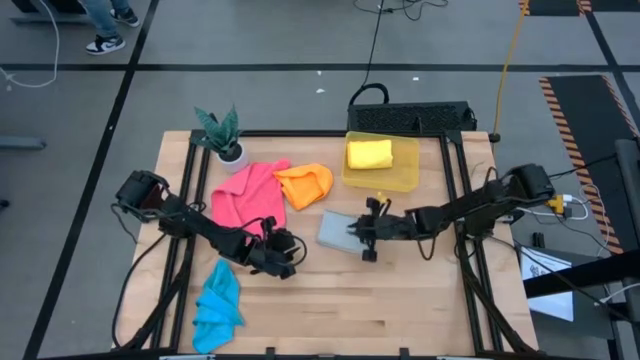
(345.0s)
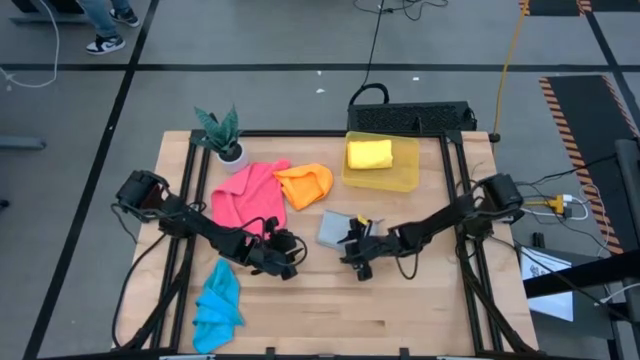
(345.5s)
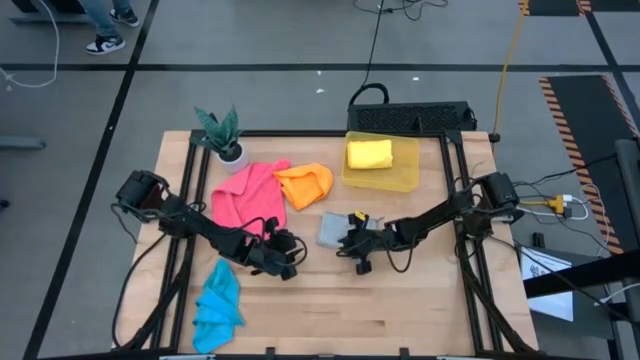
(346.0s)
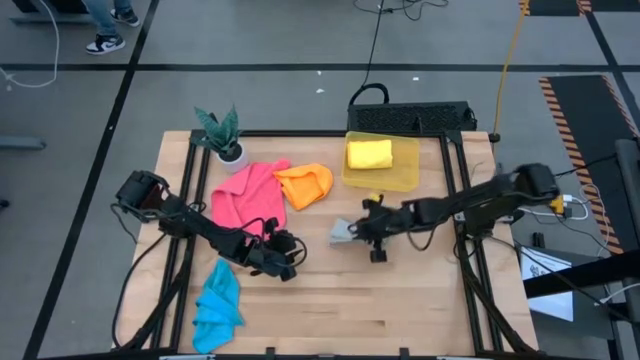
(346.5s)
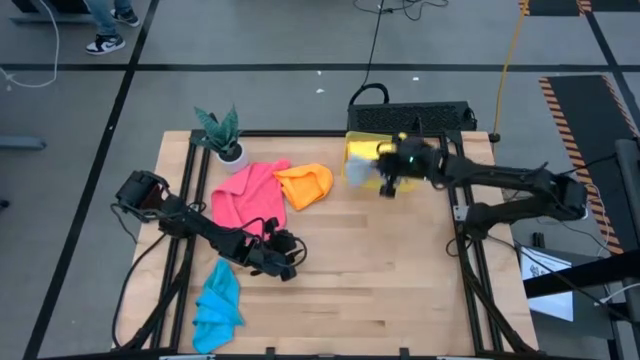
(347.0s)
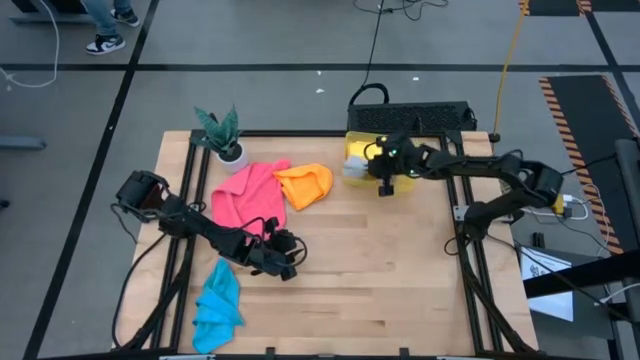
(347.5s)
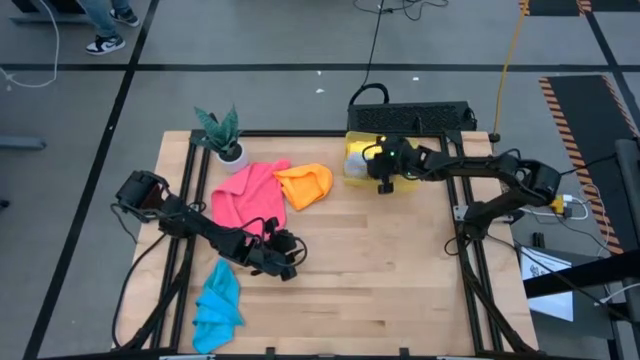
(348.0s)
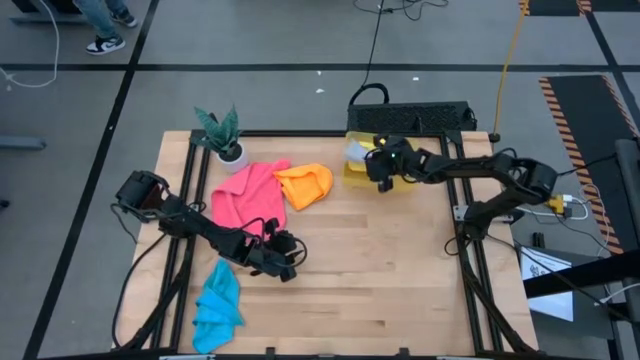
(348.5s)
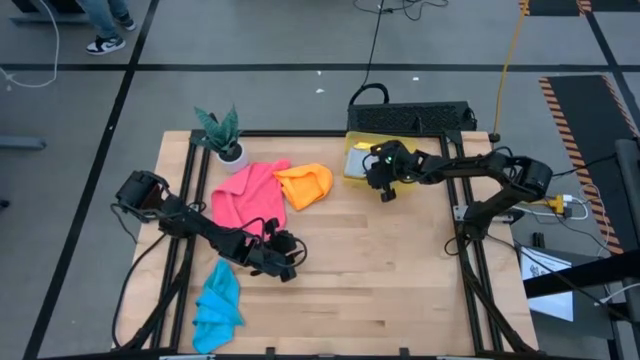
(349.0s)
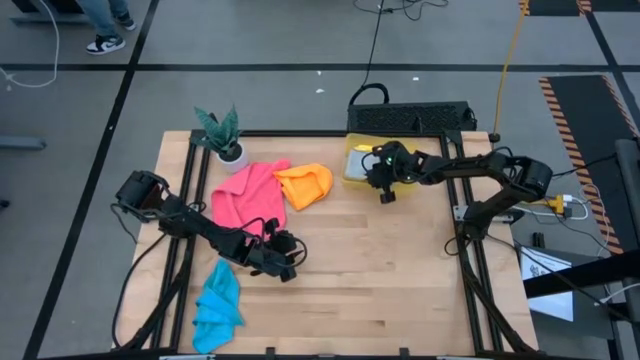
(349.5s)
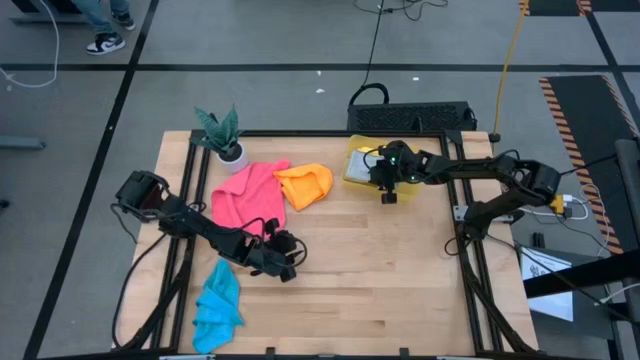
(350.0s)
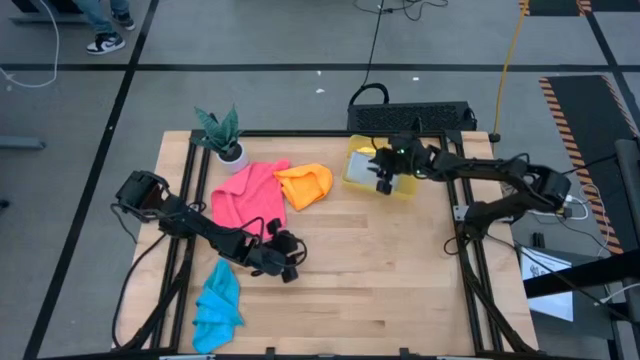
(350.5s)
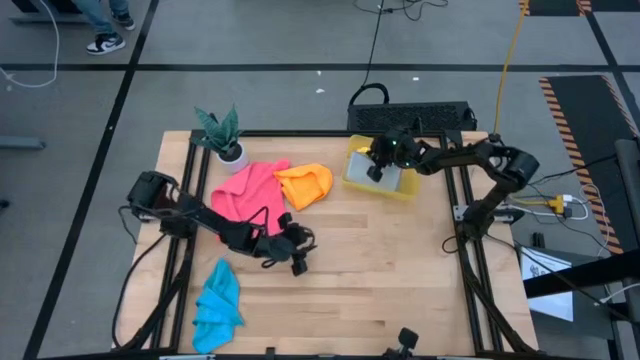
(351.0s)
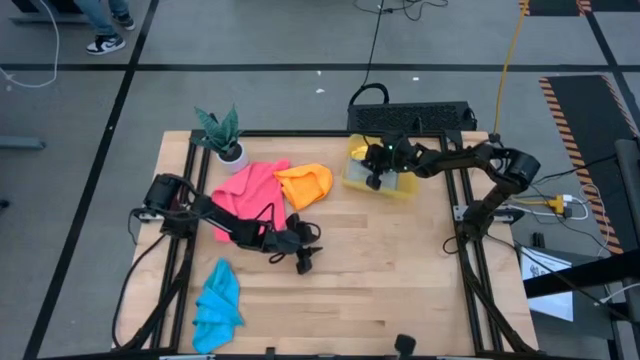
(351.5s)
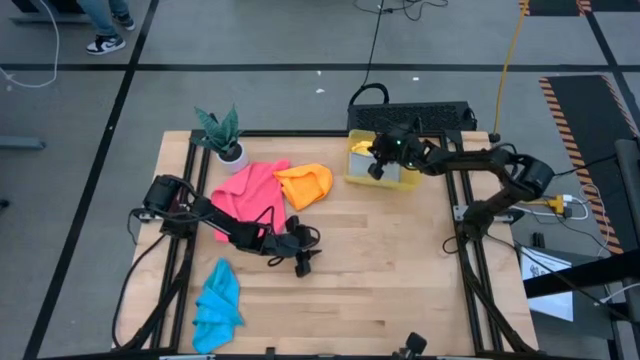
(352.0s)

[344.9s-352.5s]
Task: Fold microfiber towels
Put the gray kitchen towel into the yellow bin

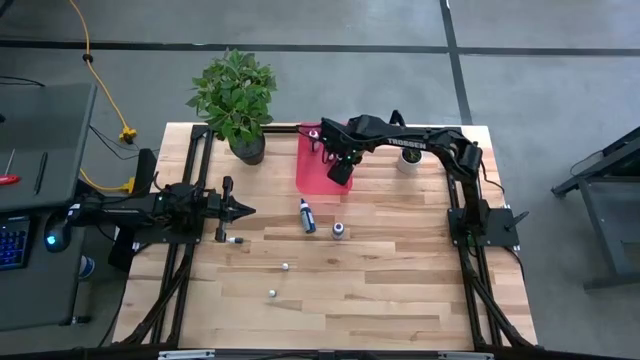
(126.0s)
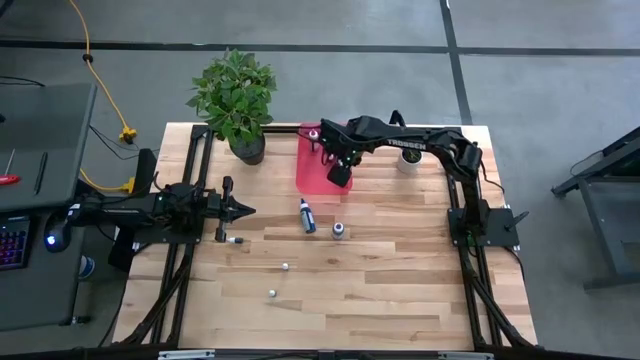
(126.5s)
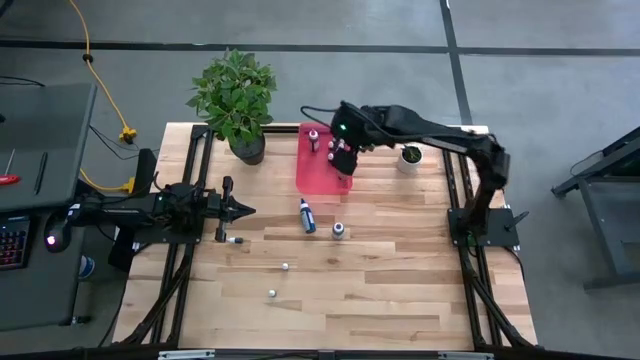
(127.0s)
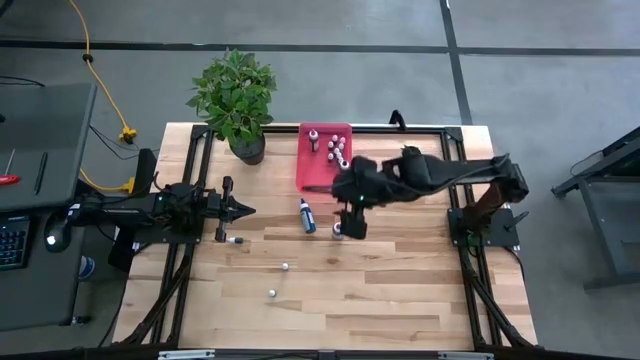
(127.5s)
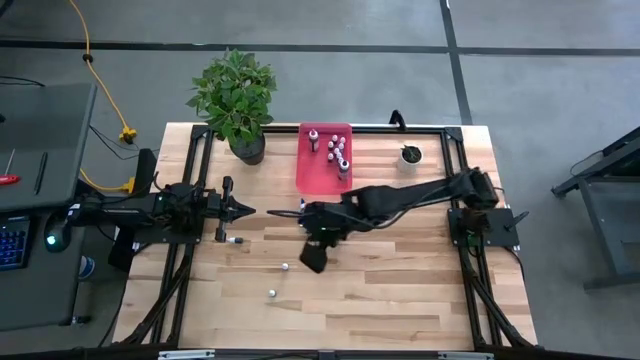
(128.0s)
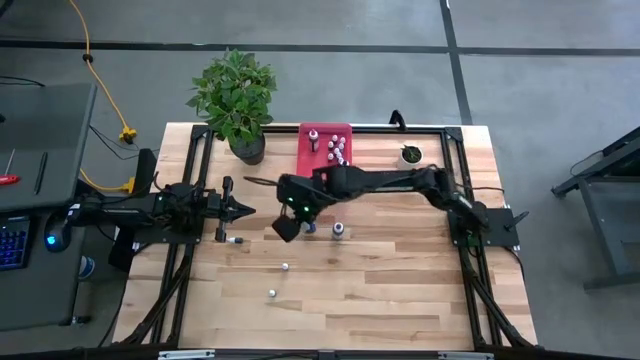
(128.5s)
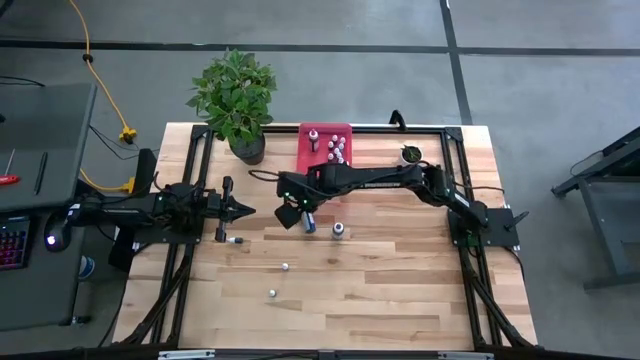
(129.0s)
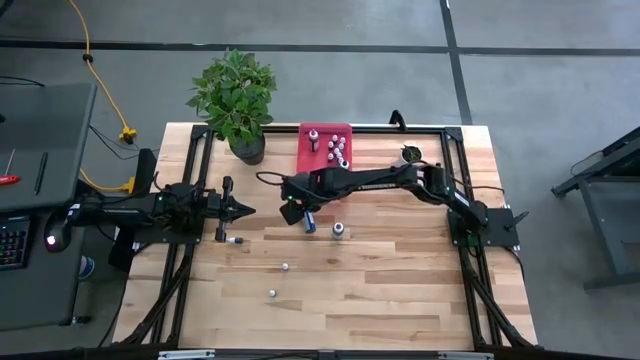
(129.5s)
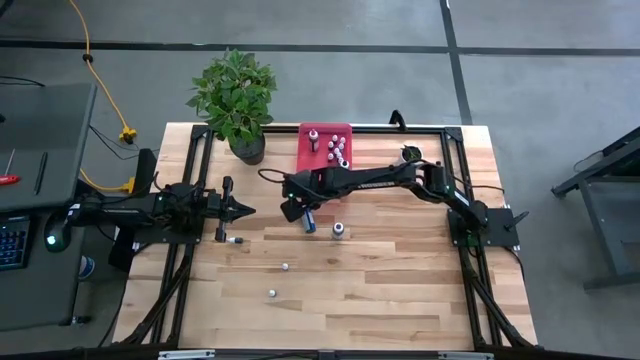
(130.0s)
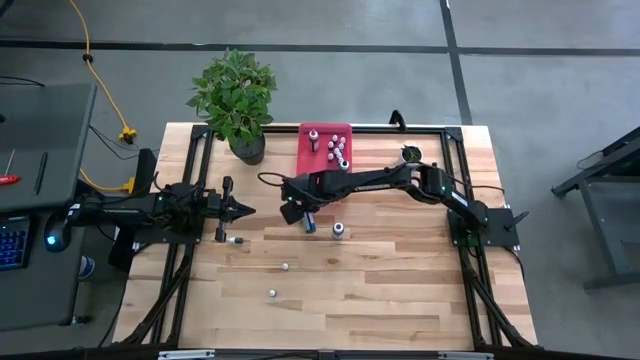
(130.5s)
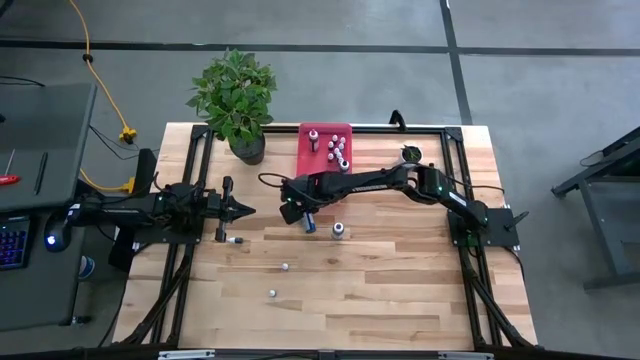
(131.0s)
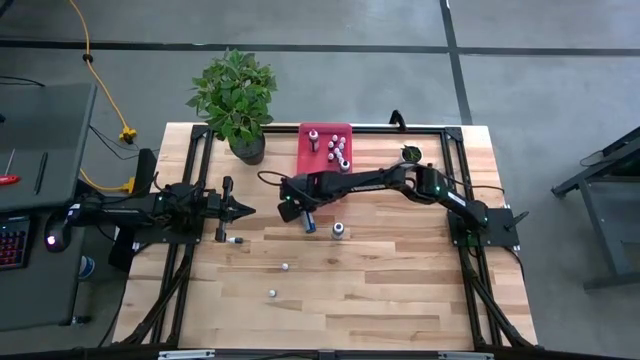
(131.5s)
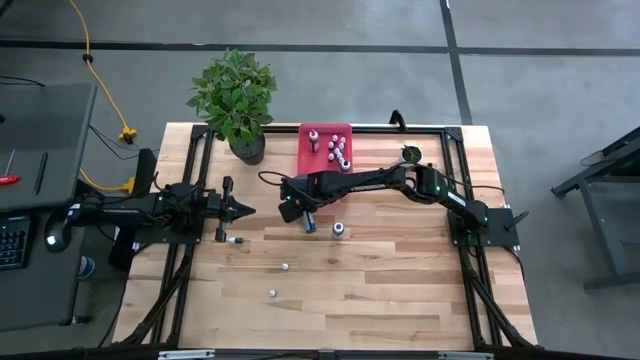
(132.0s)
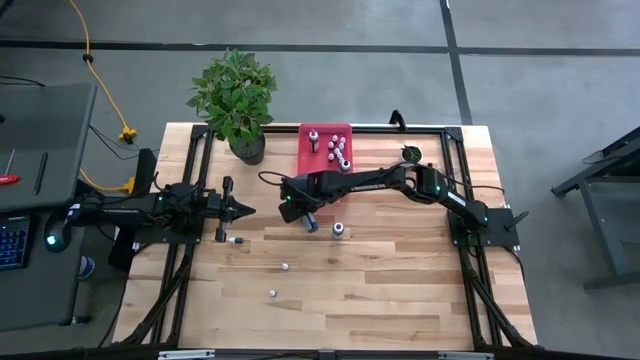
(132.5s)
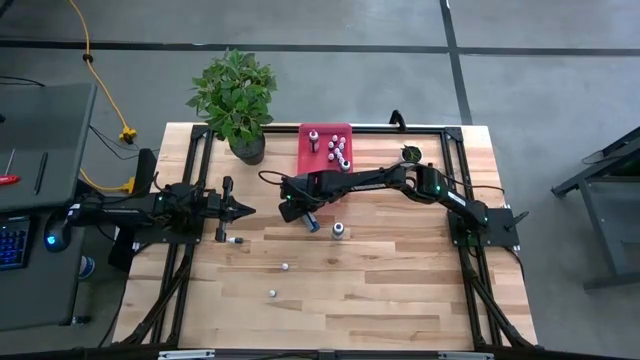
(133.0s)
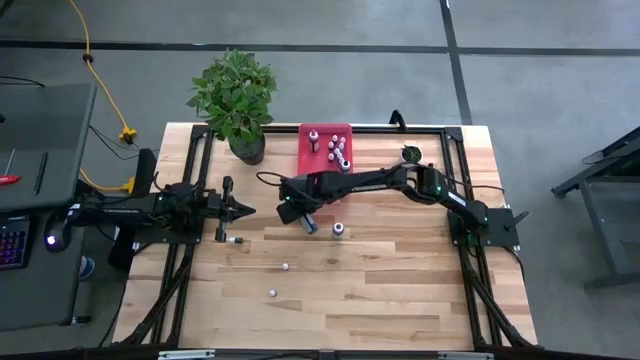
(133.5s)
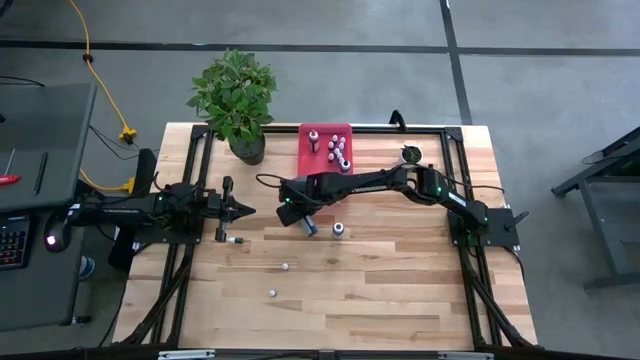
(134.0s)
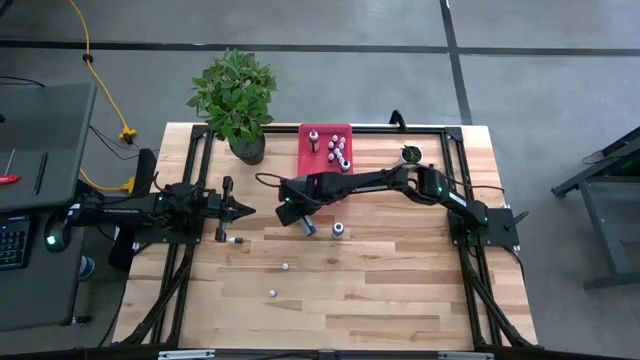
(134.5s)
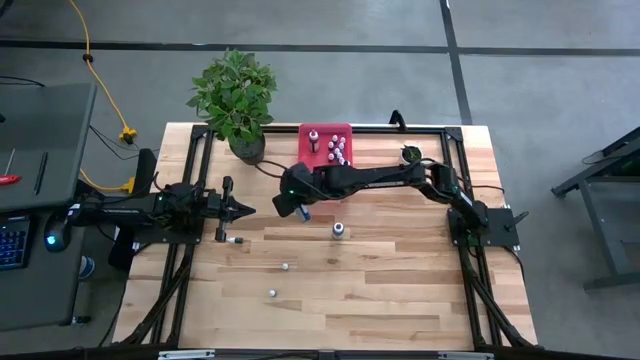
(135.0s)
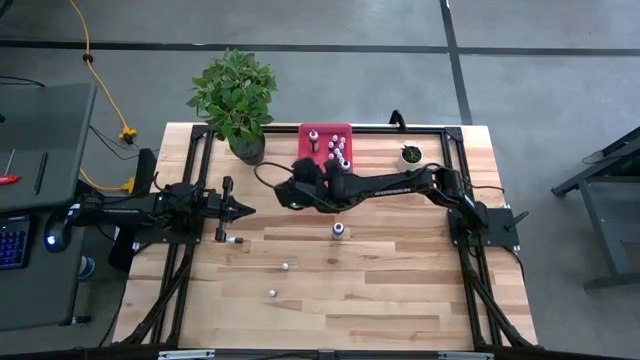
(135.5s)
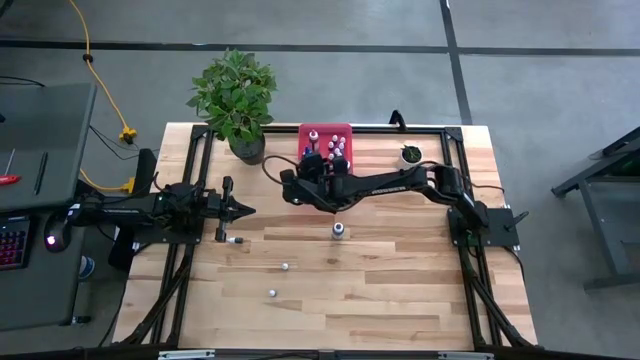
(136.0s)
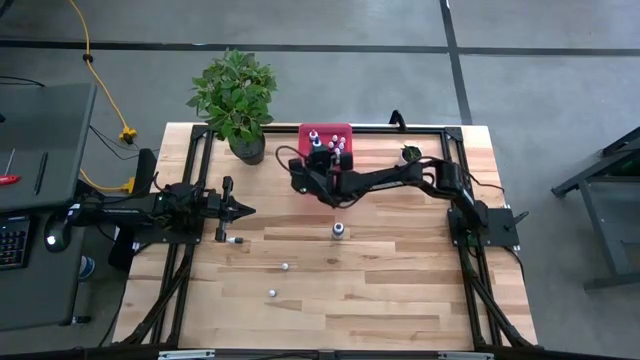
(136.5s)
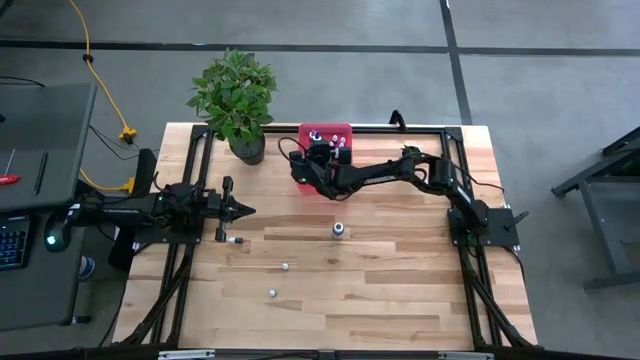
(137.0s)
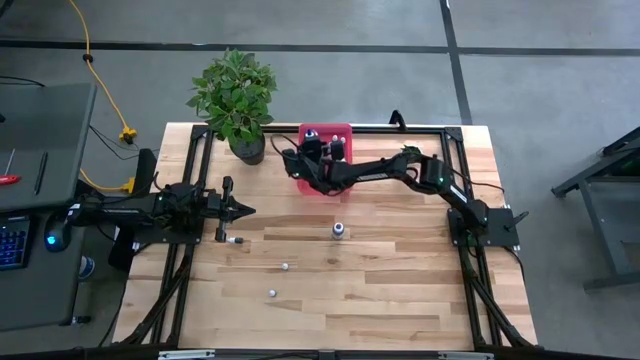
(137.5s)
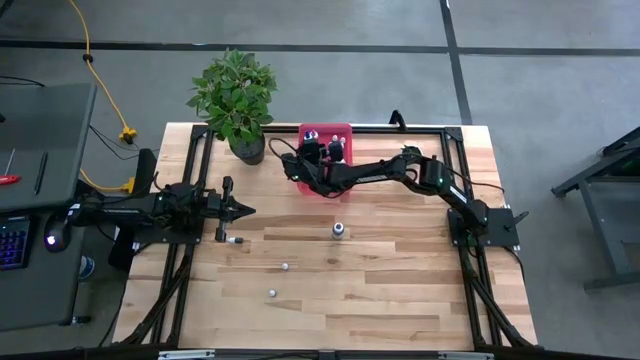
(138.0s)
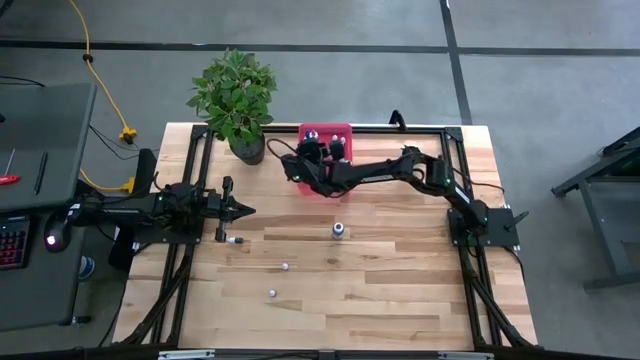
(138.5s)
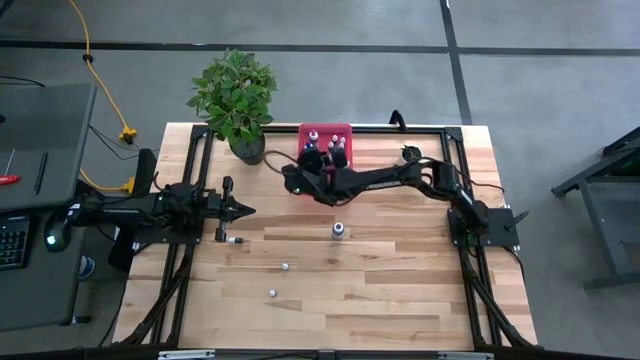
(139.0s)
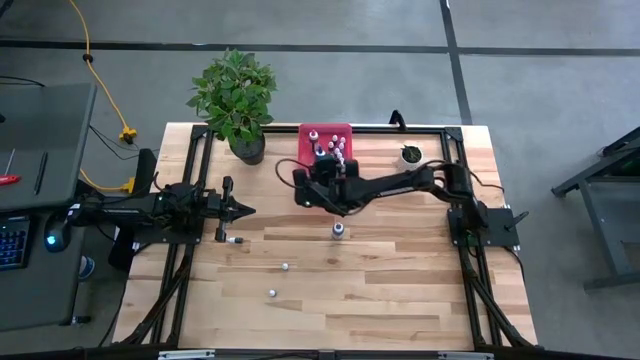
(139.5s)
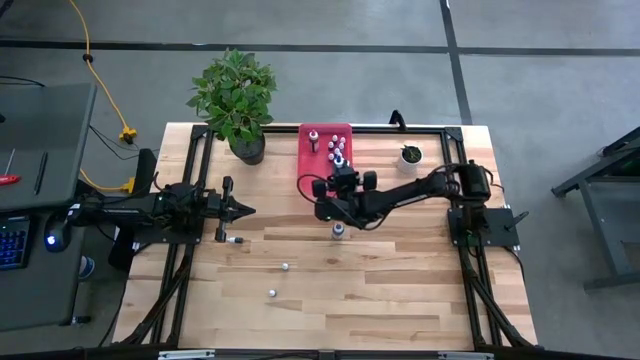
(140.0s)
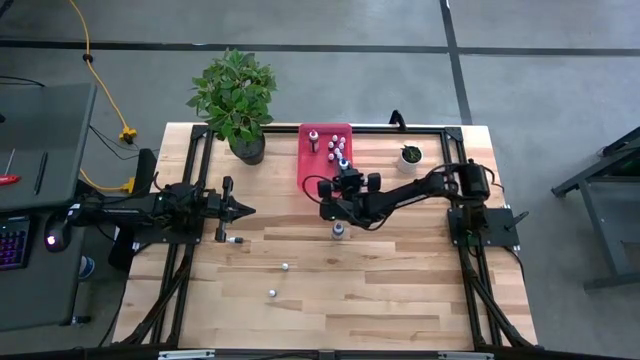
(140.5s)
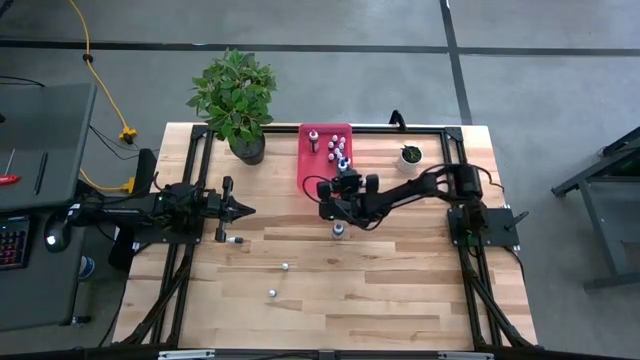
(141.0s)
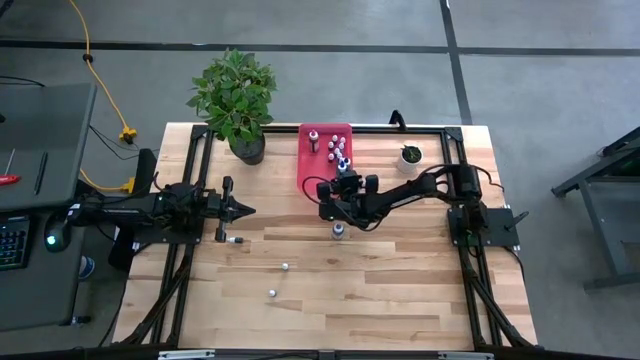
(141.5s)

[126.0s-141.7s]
Task: Pick & Place food coloring
Put the blue food coloring bottle into the pink bin
